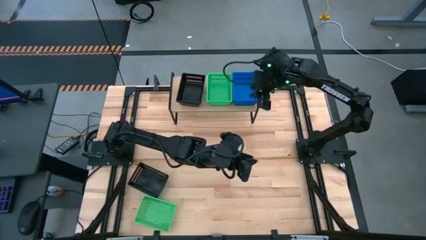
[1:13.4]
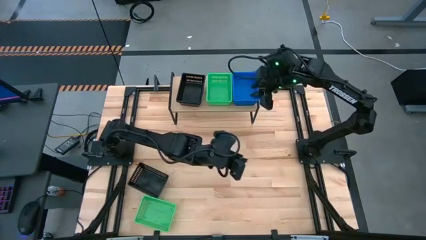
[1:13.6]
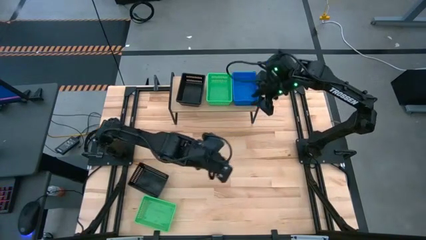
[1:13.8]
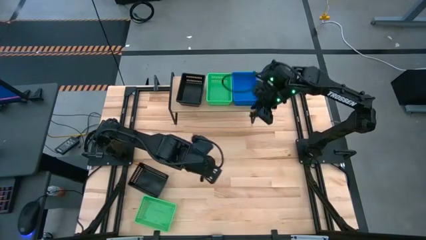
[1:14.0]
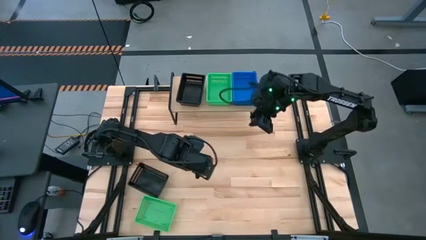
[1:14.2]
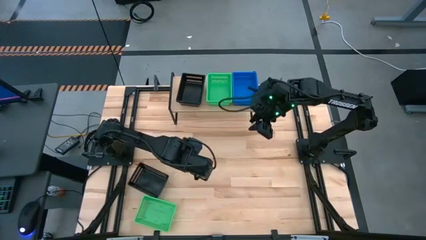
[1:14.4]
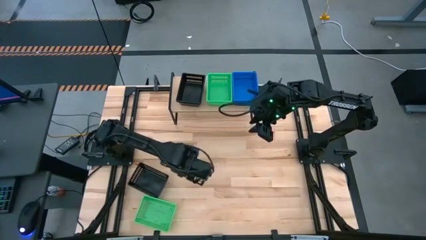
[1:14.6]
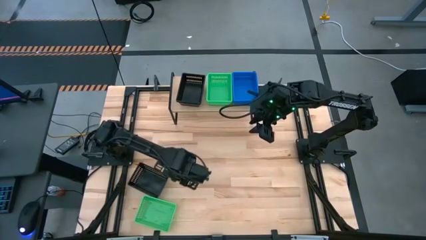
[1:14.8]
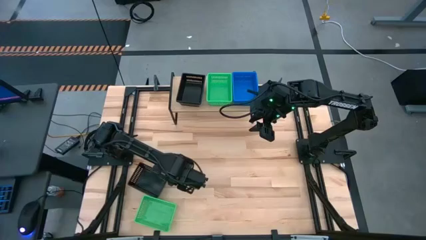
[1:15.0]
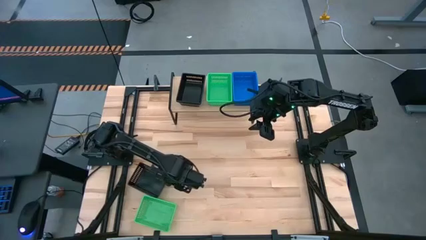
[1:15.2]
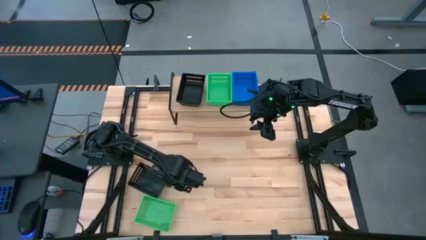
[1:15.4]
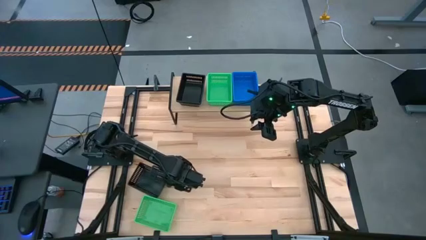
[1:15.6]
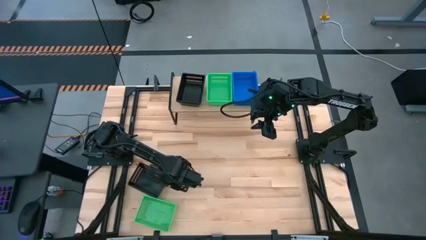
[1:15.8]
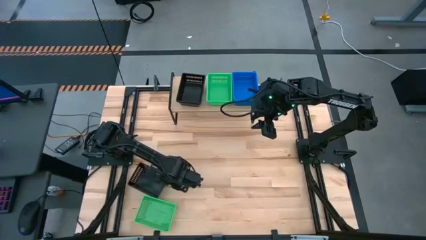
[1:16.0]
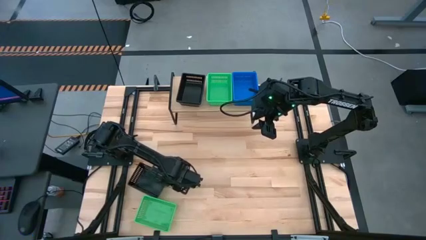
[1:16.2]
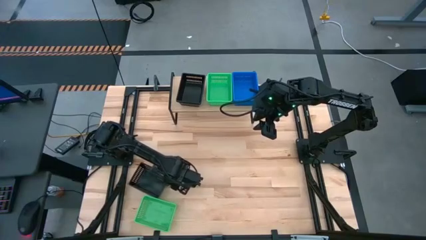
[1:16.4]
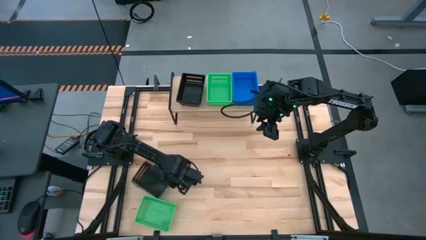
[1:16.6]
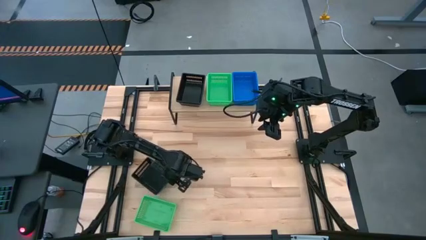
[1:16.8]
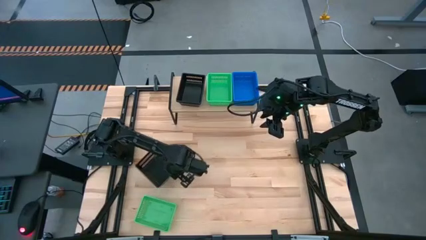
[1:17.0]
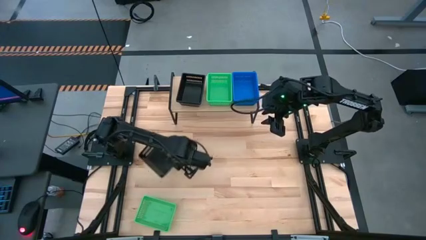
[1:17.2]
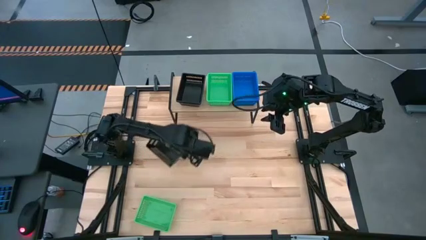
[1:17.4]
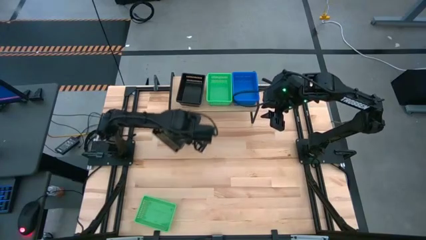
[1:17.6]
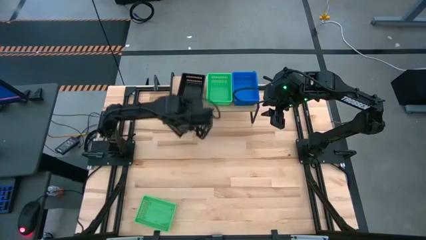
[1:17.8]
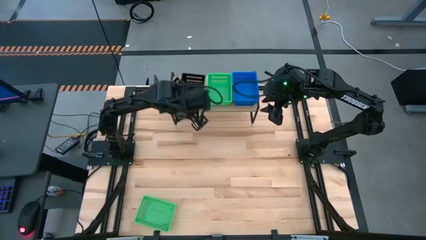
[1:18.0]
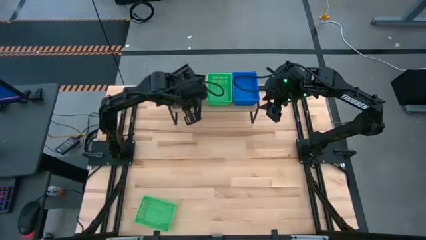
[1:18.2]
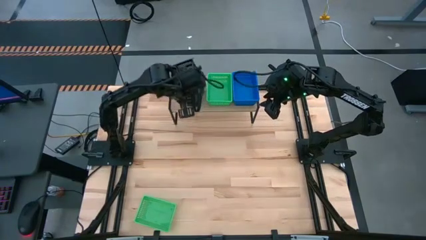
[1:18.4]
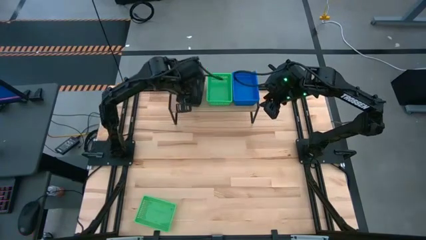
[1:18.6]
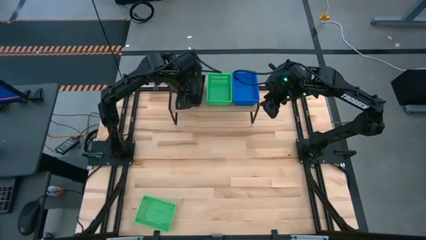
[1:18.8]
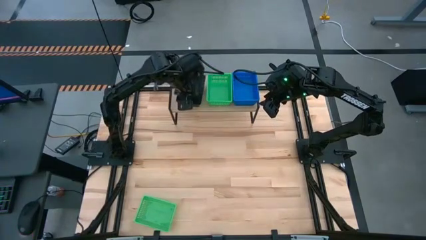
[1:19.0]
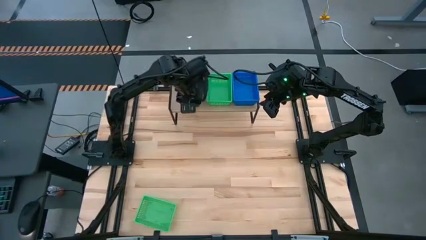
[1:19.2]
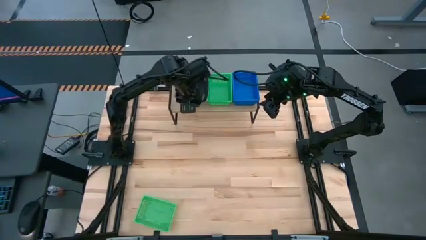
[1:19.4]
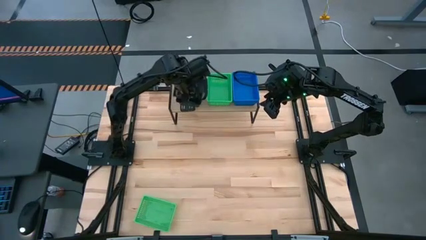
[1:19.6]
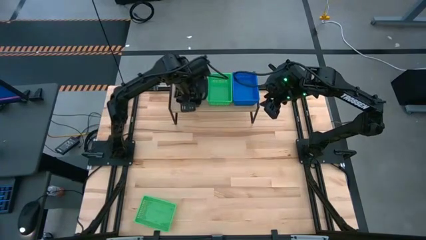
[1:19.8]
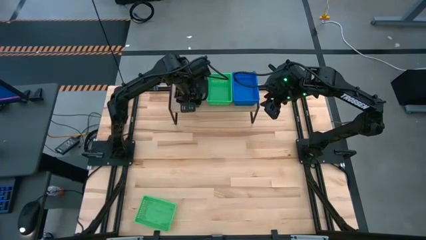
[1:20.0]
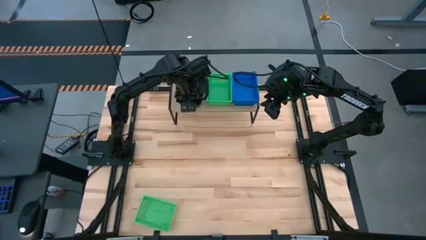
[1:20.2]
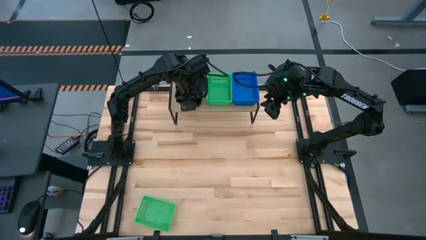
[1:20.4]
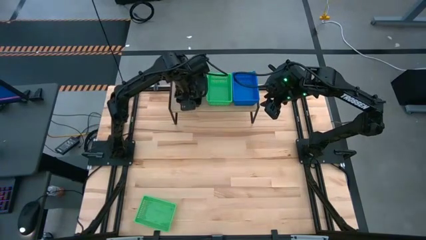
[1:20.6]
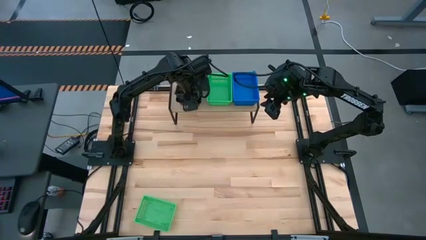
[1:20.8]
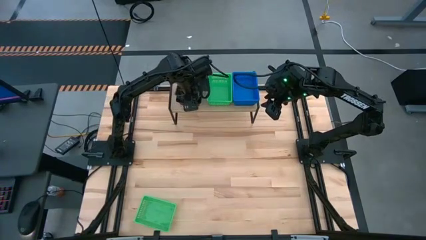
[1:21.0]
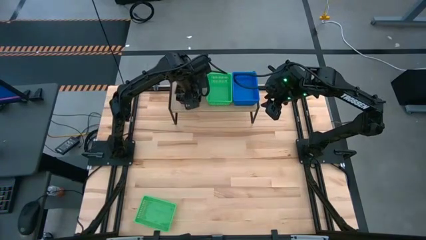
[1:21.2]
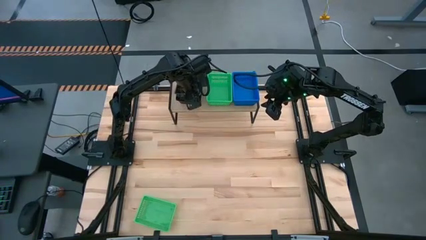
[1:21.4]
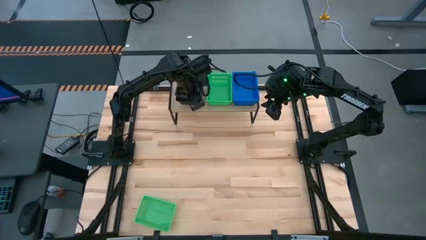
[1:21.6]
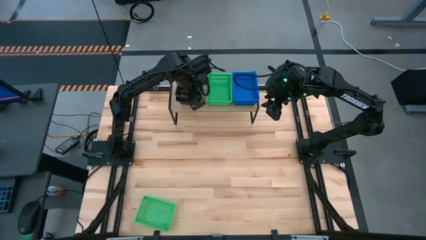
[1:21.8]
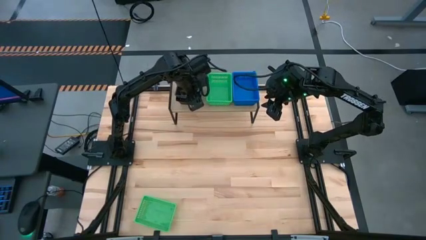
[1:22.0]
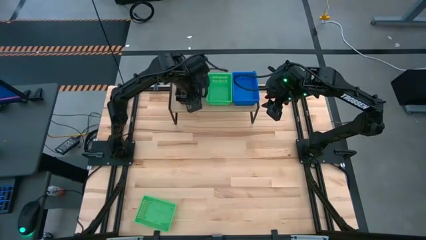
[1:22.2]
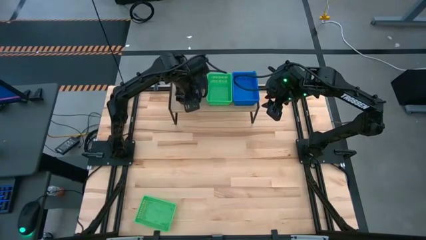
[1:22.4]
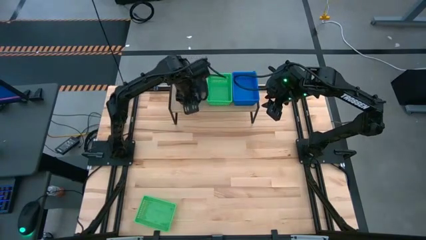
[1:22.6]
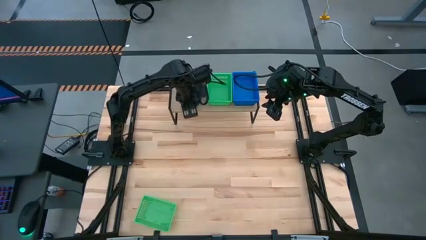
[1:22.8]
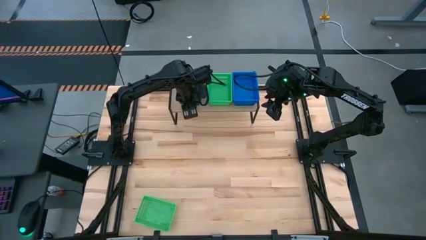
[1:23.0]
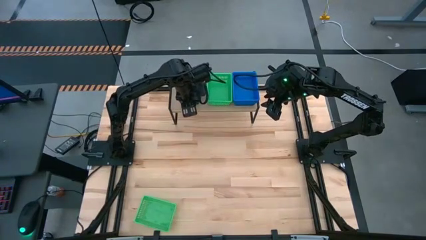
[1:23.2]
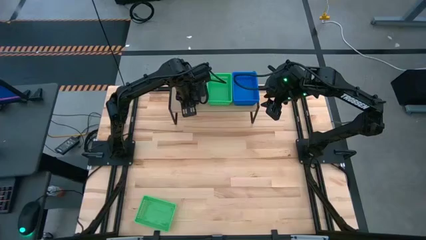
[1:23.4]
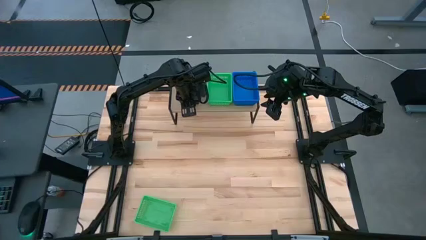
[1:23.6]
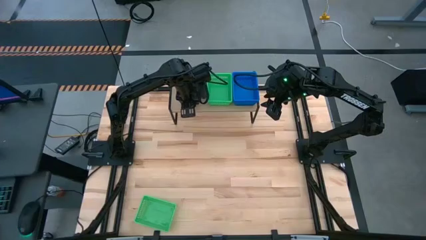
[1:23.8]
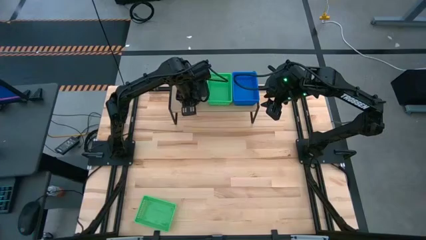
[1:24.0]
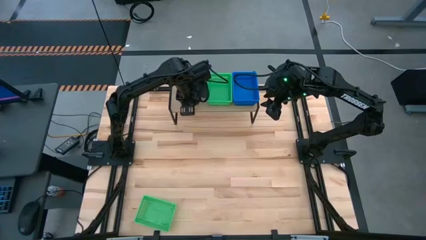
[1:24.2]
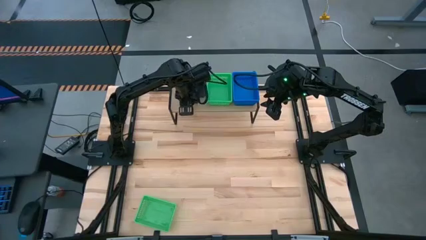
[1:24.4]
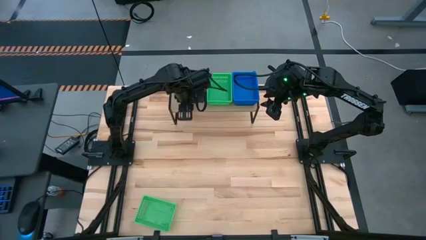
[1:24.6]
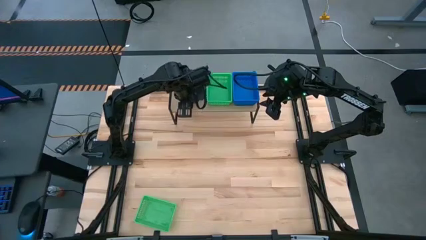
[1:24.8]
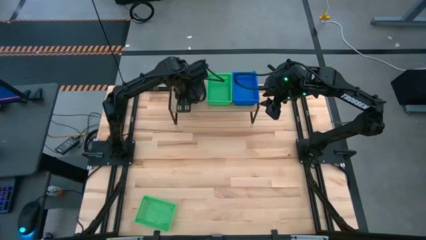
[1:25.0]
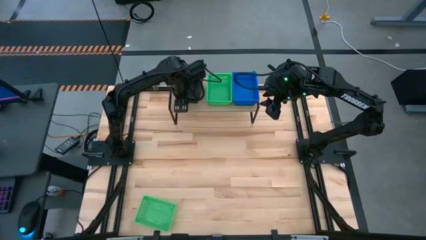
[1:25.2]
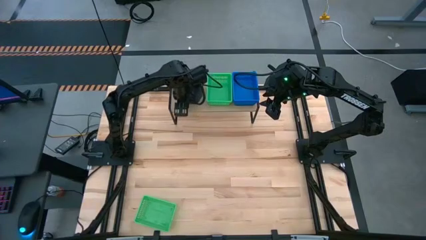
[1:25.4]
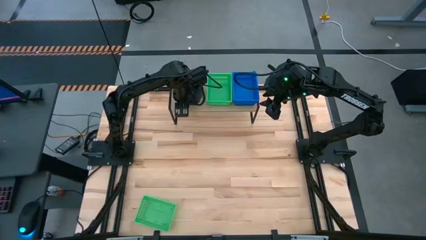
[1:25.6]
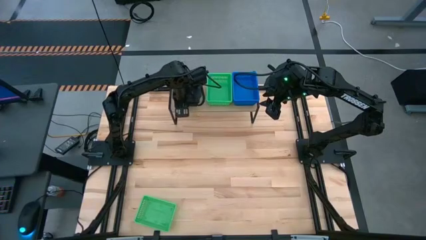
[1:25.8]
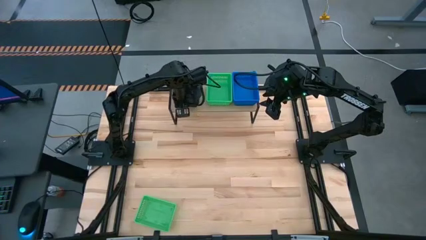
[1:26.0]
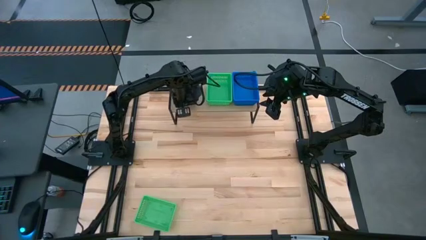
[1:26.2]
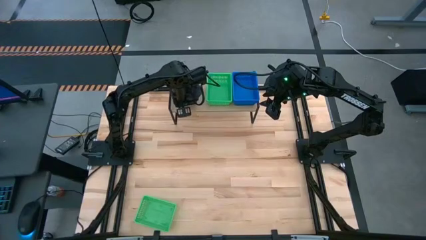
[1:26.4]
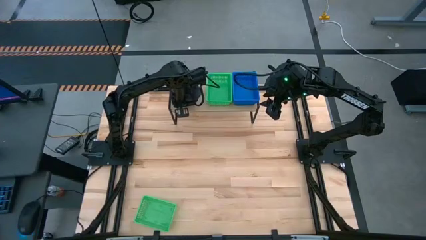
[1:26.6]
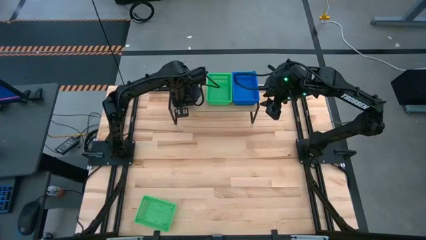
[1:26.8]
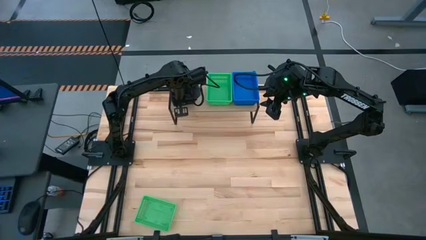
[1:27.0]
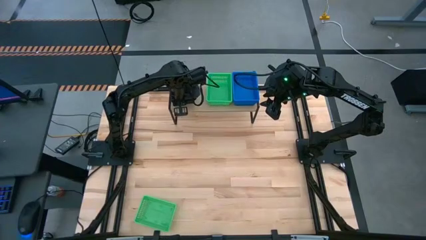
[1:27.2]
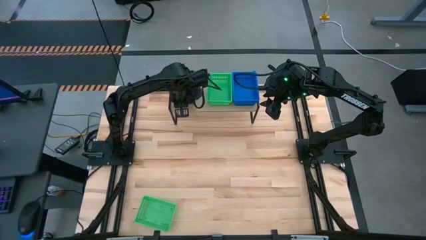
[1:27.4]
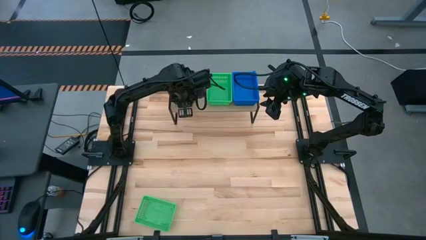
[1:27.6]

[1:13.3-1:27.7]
Task: Stack baskets on shelf by color
Stack the black basket on top of the other black baskets on the shelf

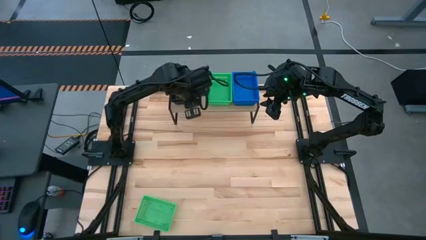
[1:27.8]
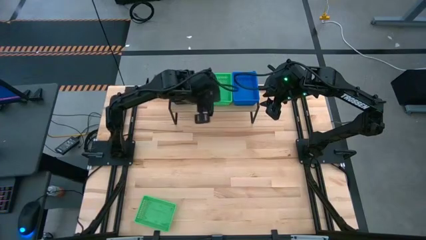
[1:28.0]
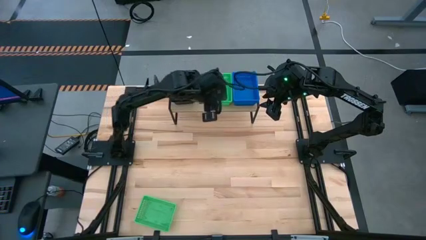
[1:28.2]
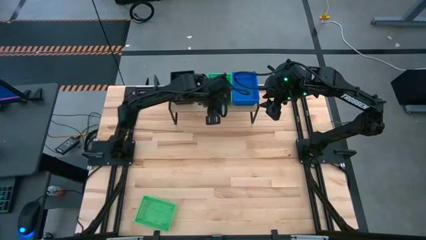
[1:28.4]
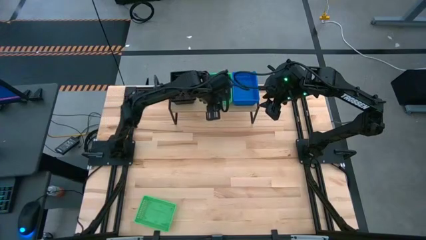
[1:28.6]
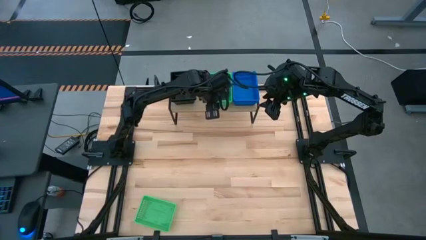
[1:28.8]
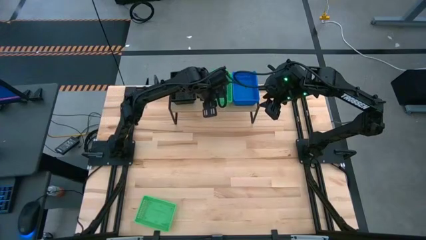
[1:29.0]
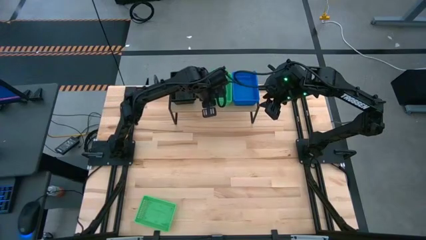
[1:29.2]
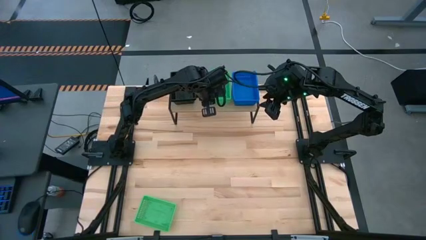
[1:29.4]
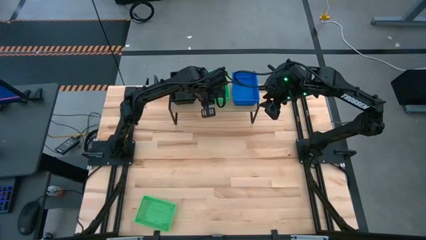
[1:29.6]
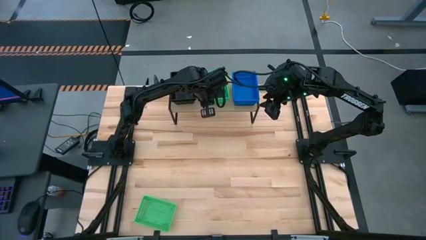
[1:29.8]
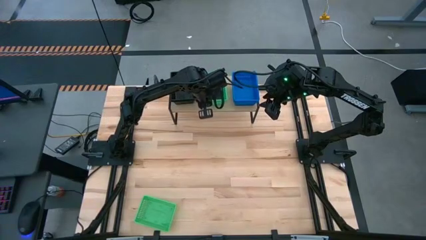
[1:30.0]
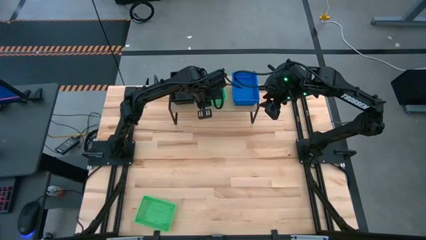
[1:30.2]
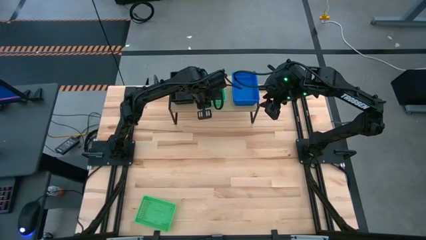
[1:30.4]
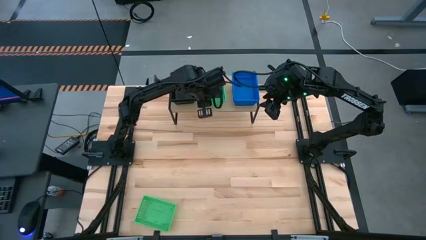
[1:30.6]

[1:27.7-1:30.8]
Adjust the stacked green baskets on the shelf
